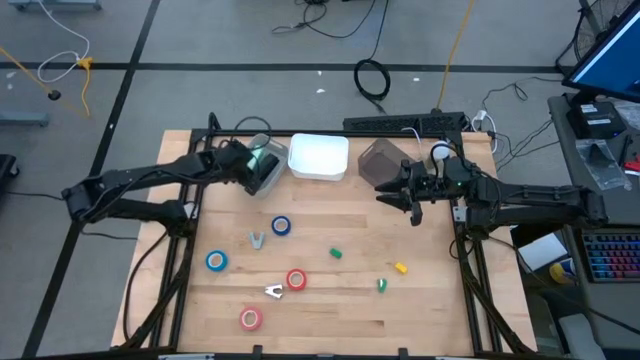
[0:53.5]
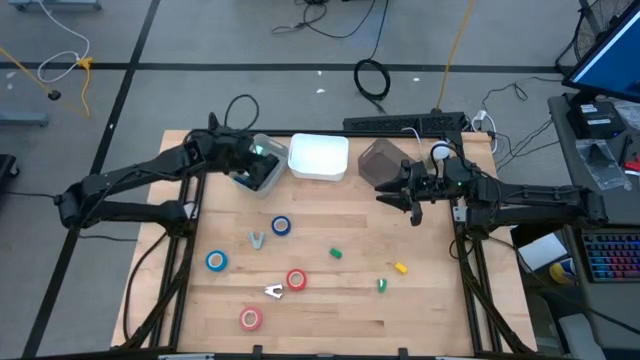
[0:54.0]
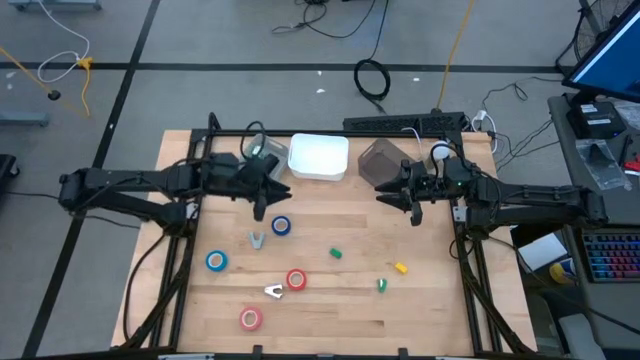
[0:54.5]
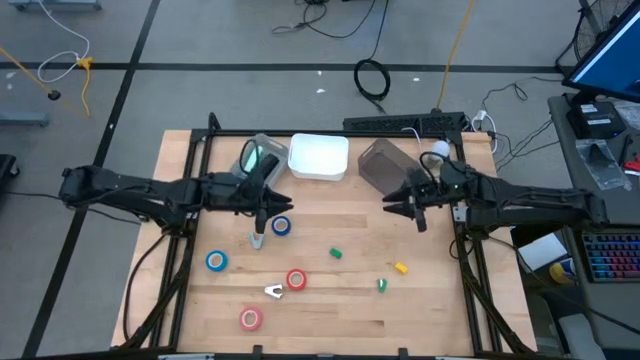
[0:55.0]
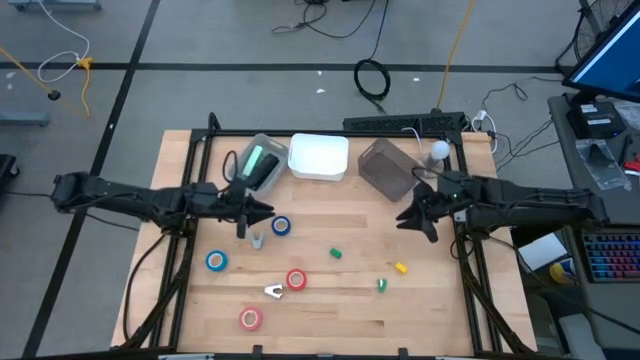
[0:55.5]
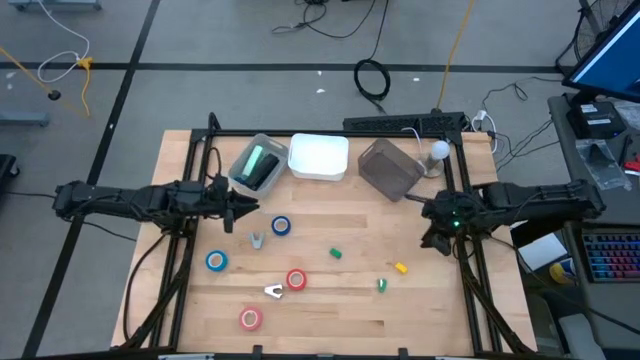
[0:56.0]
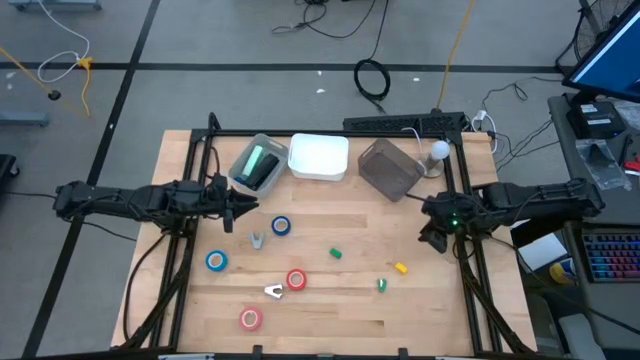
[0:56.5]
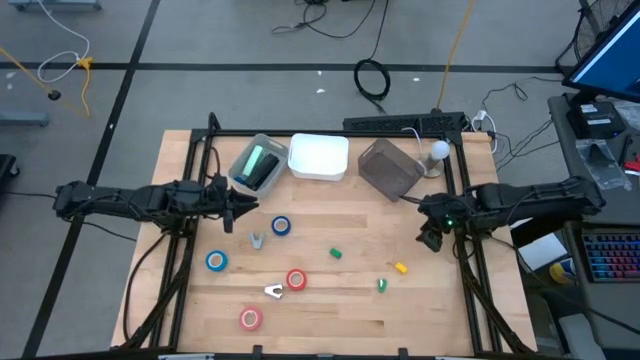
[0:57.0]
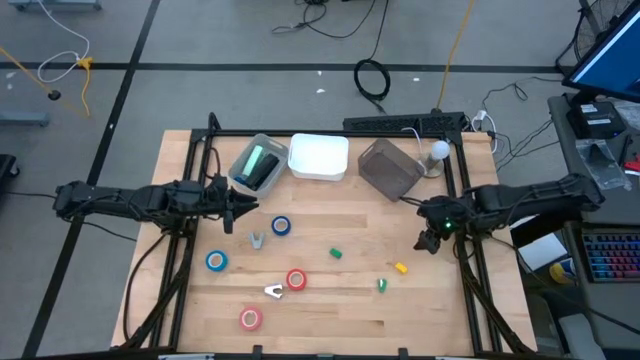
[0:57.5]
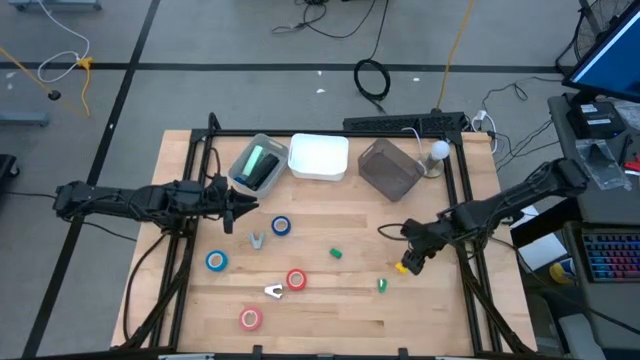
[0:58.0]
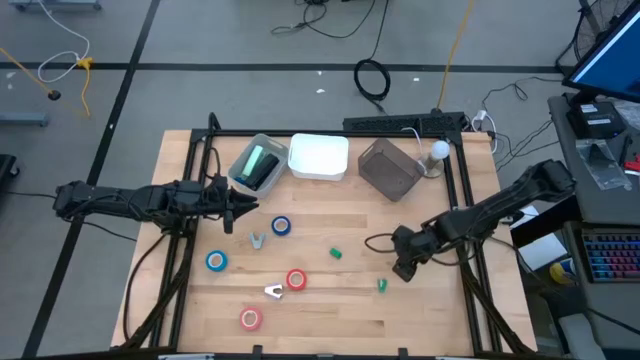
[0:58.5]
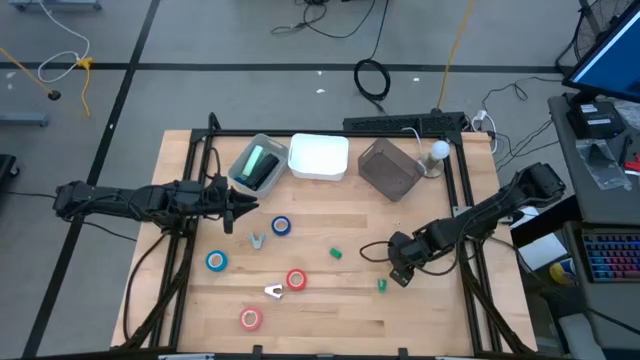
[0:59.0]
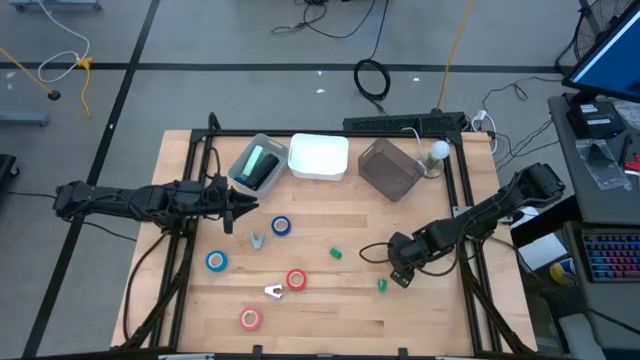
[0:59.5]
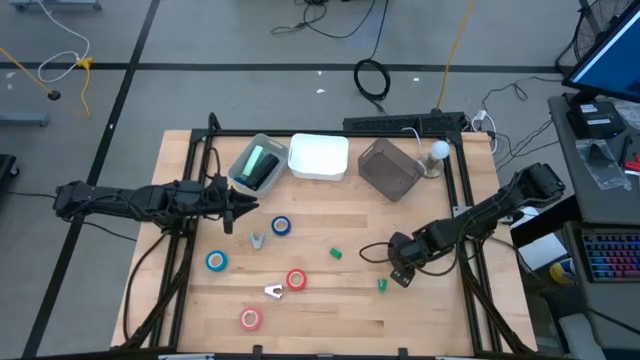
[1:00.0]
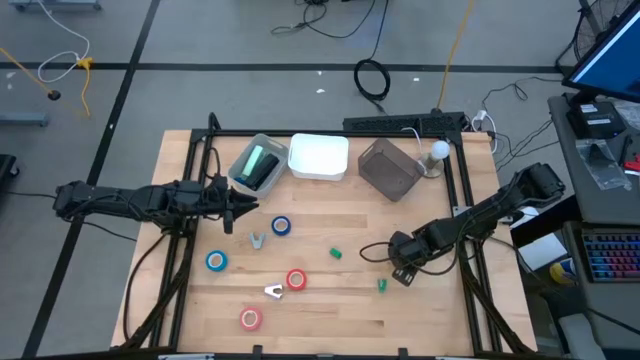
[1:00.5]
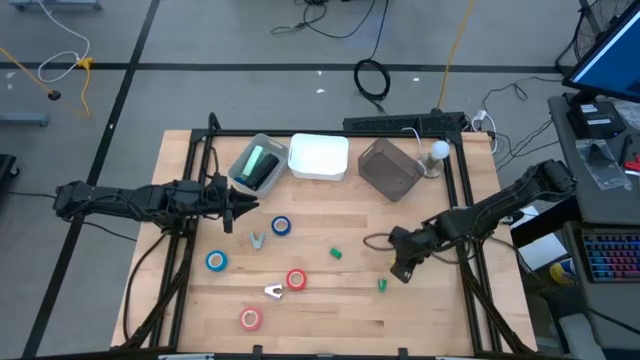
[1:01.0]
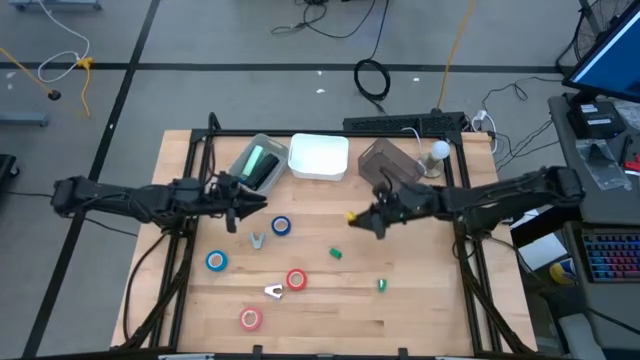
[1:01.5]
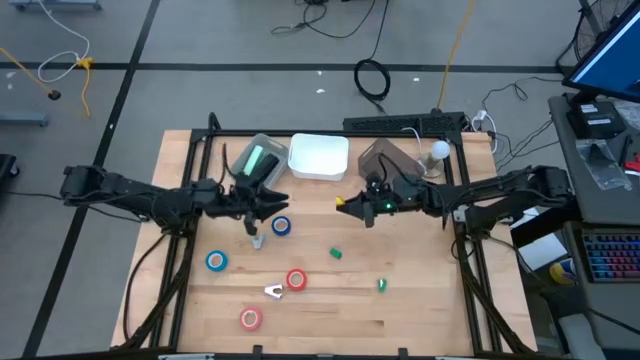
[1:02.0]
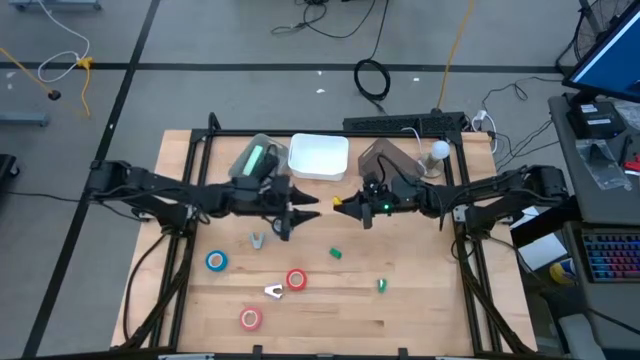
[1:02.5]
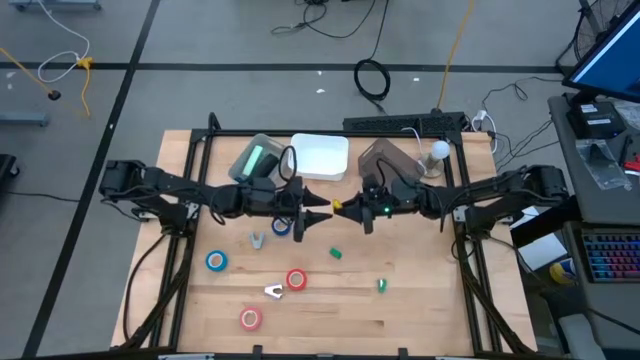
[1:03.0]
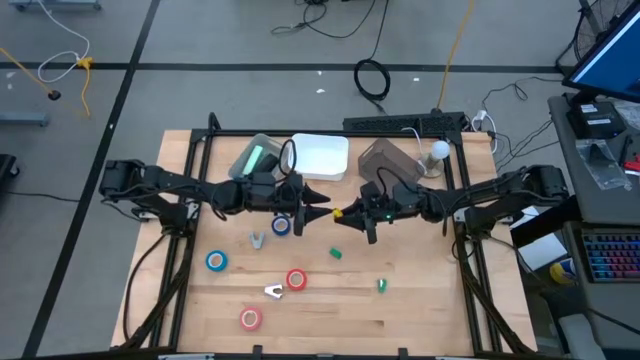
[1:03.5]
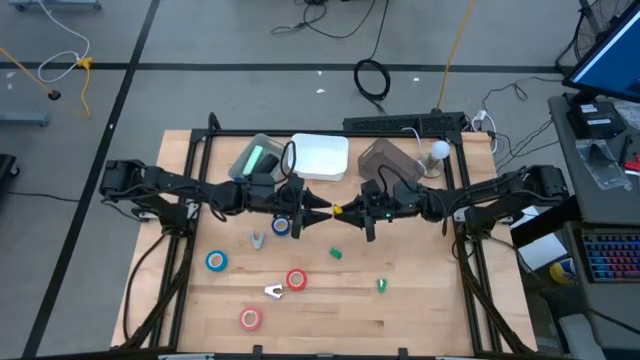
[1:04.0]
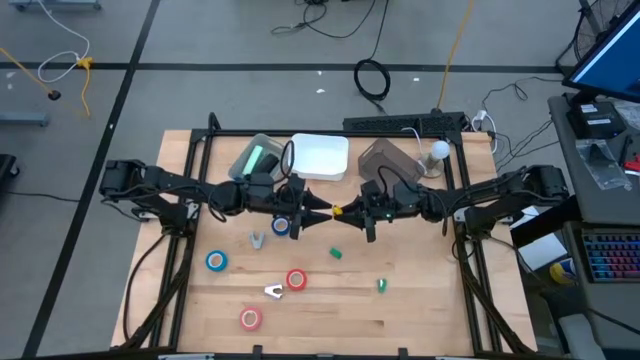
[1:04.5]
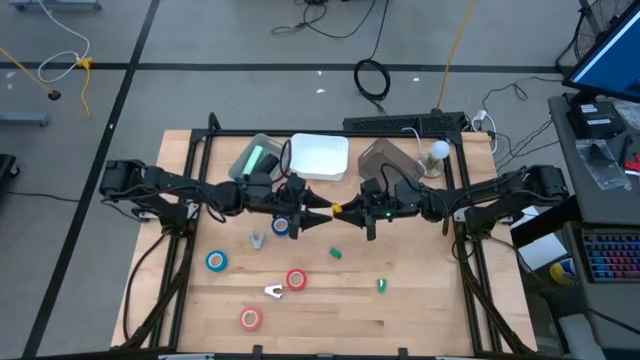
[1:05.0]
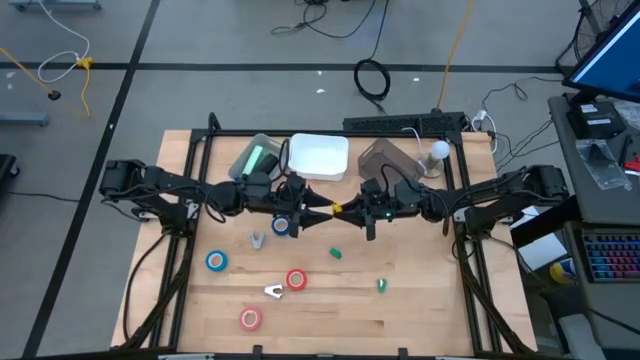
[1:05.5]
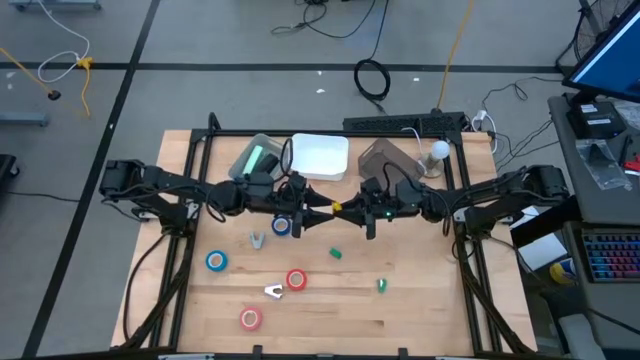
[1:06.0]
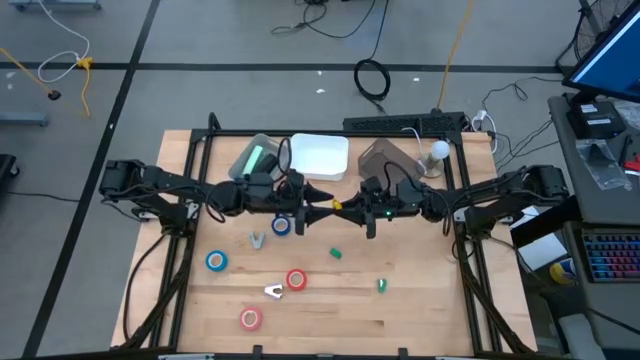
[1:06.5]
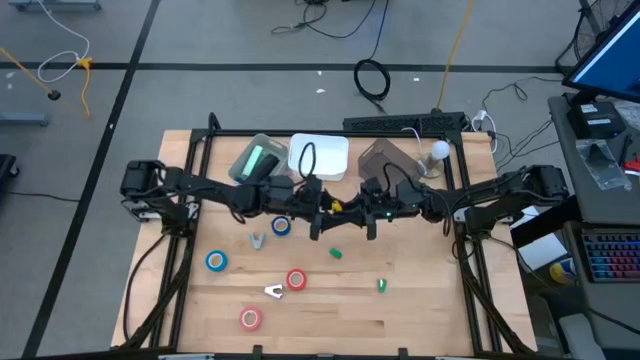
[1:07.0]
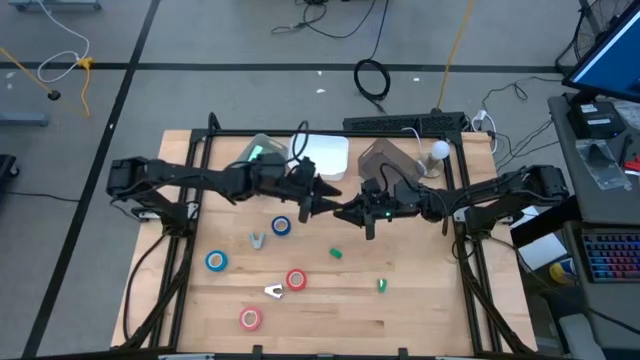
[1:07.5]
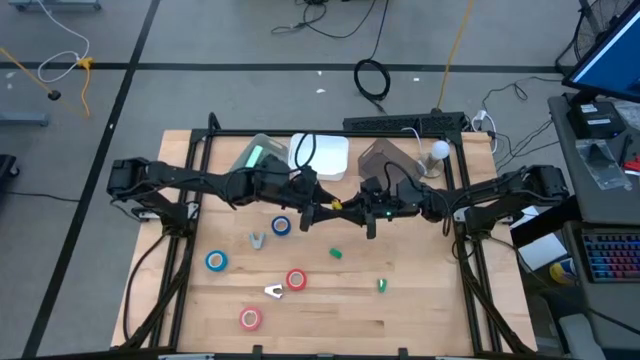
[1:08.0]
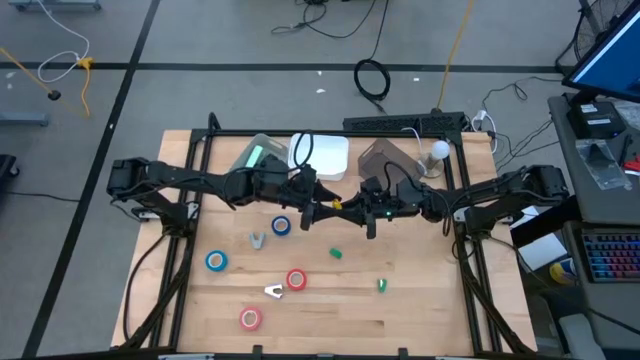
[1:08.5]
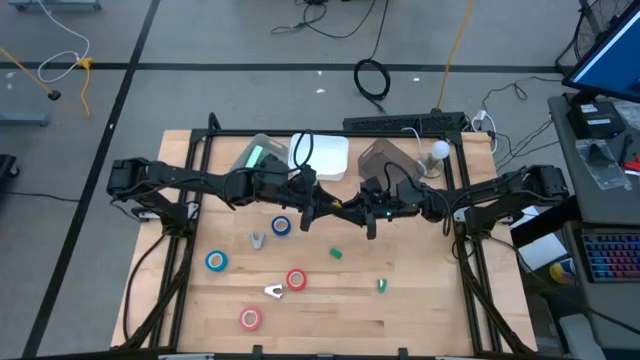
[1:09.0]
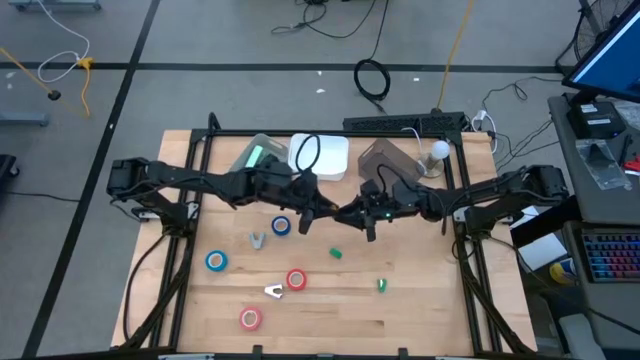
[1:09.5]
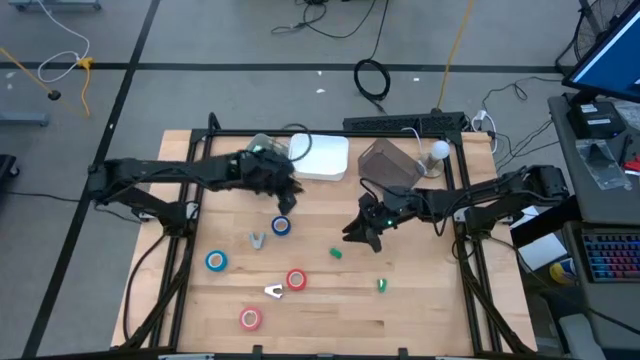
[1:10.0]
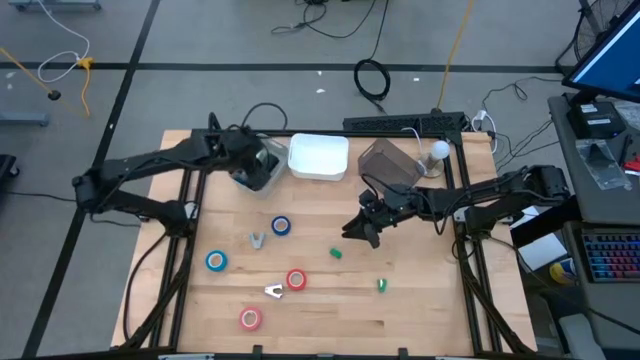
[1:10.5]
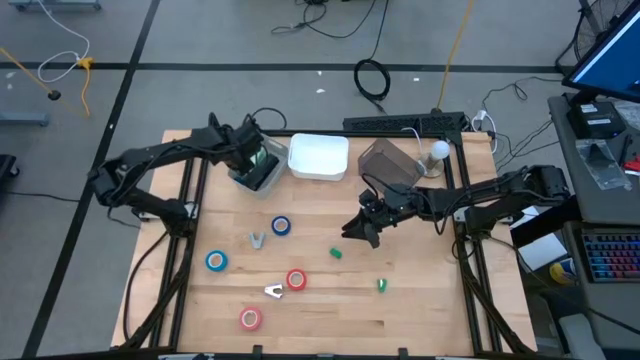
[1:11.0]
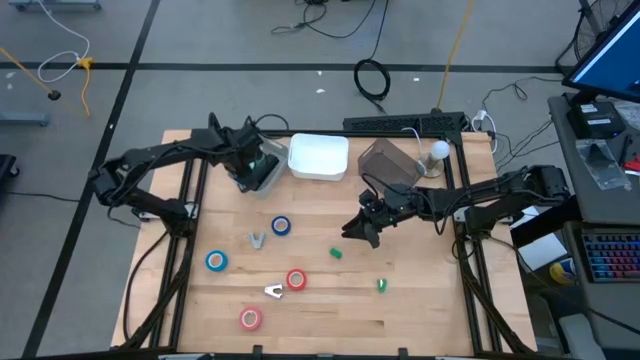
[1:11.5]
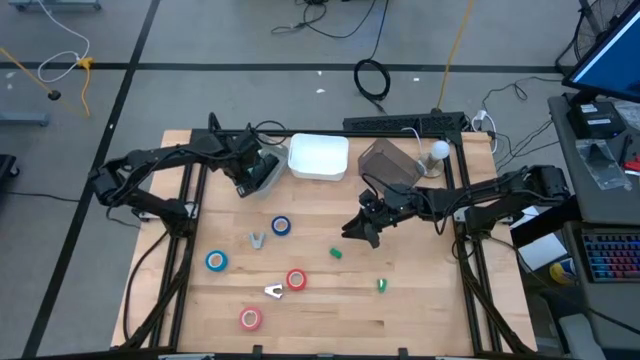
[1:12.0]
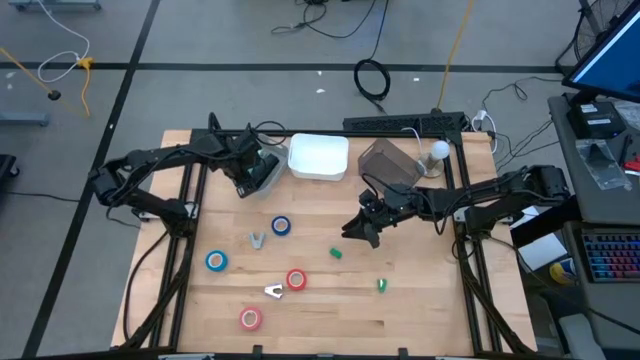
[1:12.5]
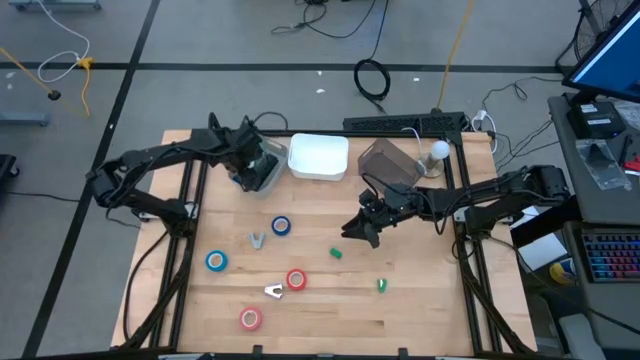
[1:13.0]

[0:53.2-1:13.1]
Task: Pick and place Stapler, Stapler remover, tape
Put the yellow stapler into the gray bin

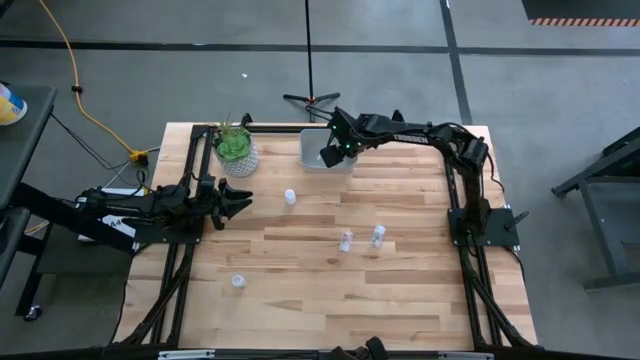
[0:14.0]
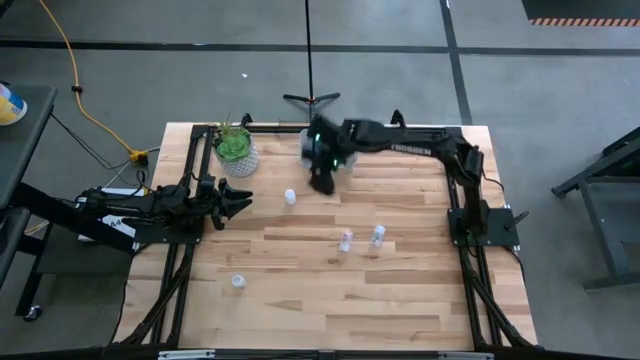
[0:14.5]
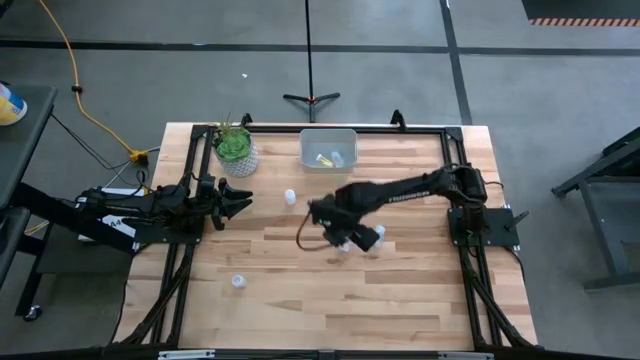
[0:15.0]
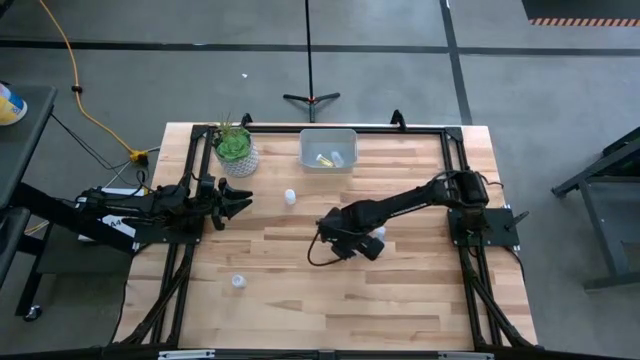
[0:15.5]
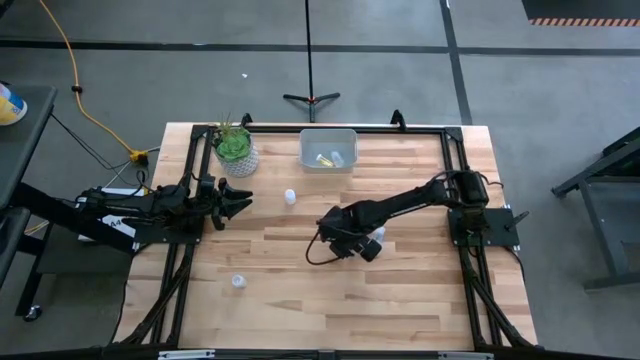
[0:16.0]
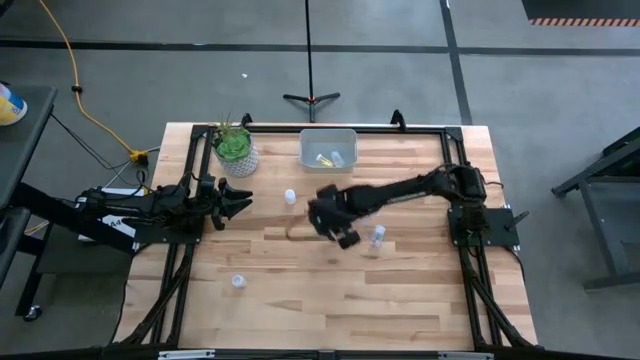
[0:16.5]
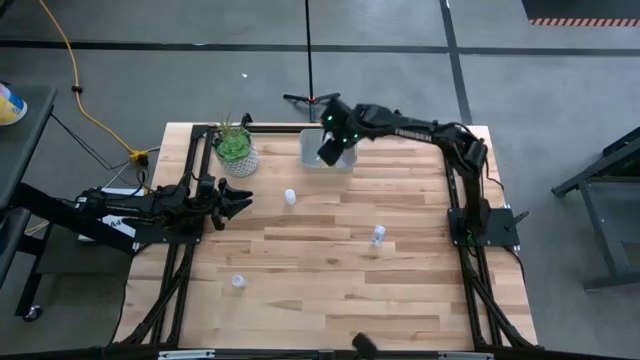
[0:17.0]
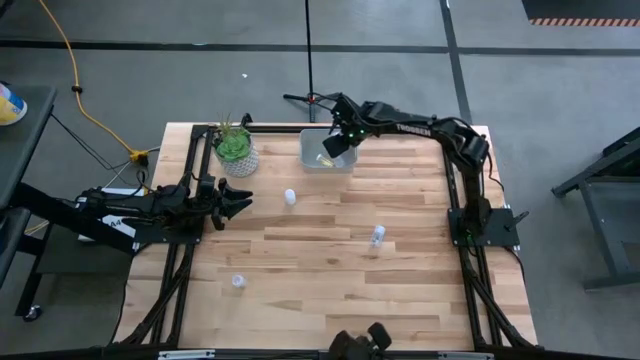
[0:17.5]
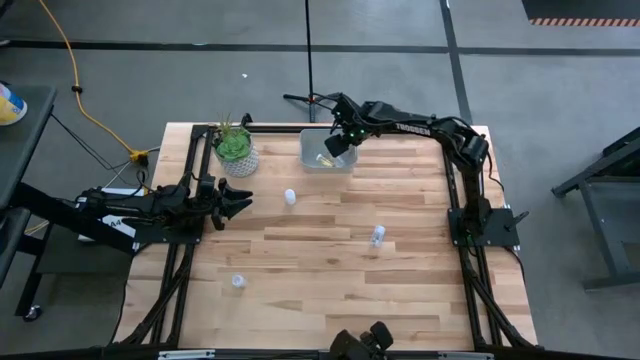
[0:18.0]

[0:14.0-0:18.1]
Task: Pick and place pill bottles into a basket
Put the transparent pill bottle into the gray bin
